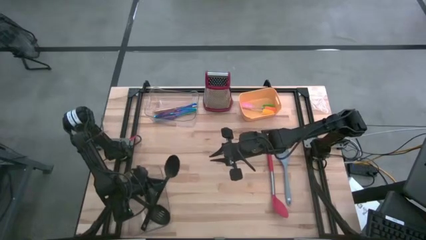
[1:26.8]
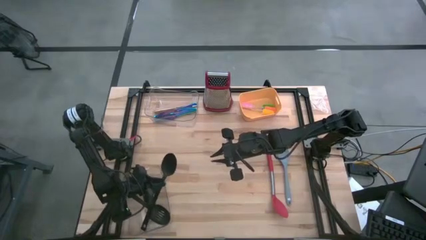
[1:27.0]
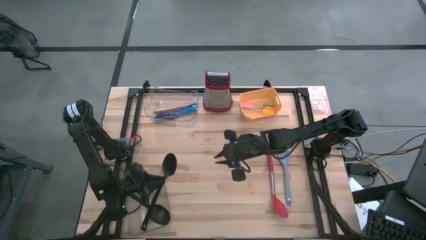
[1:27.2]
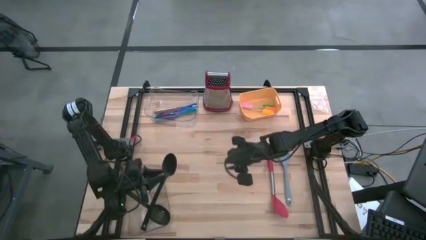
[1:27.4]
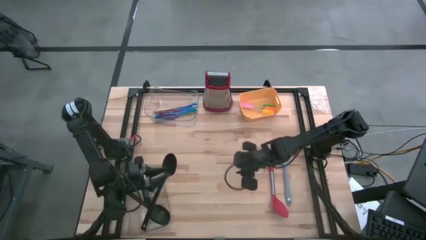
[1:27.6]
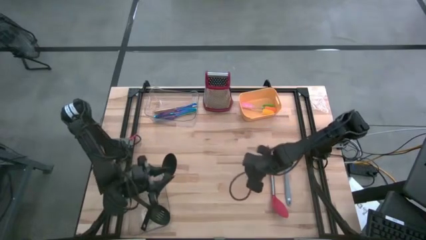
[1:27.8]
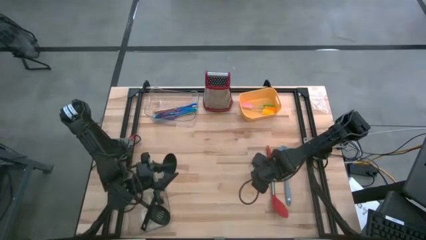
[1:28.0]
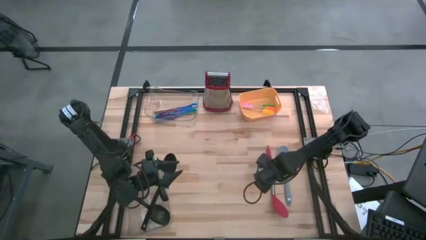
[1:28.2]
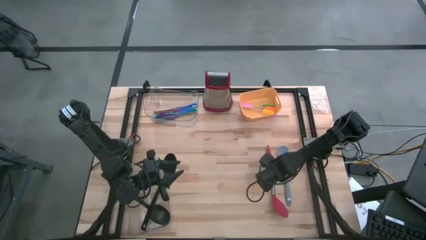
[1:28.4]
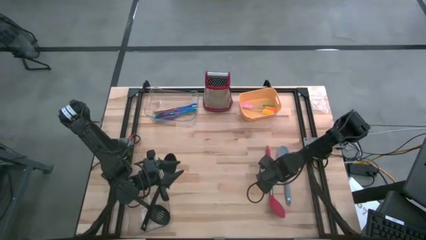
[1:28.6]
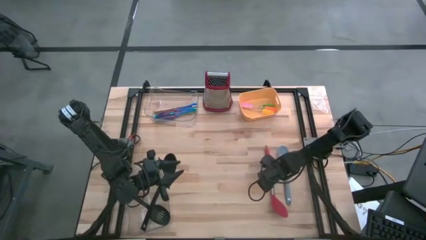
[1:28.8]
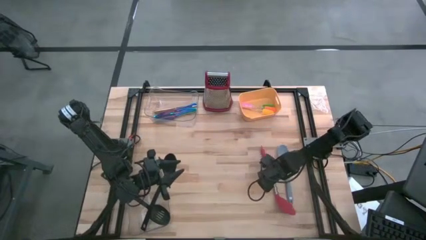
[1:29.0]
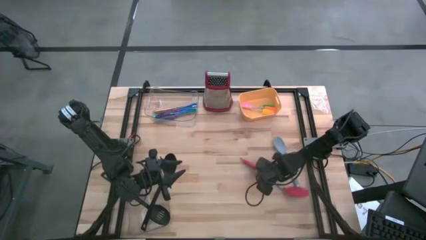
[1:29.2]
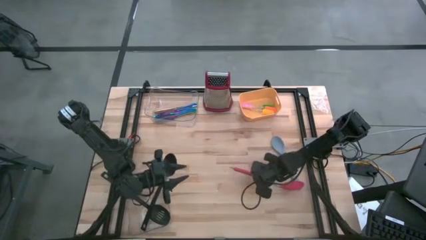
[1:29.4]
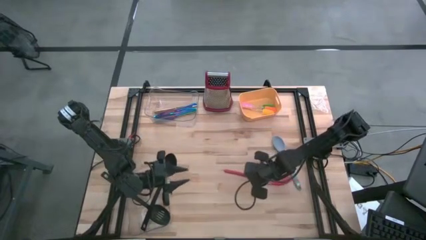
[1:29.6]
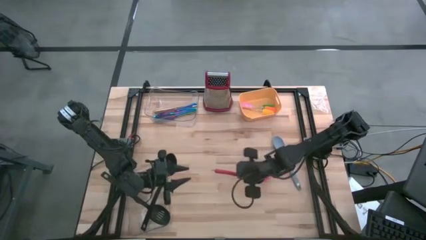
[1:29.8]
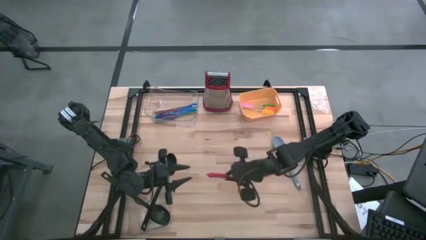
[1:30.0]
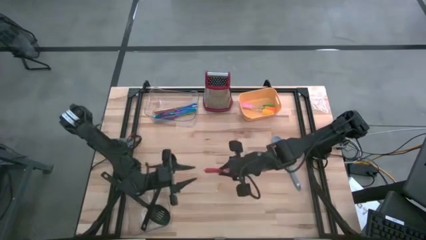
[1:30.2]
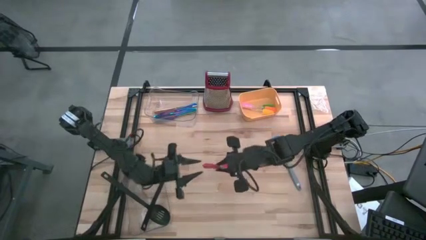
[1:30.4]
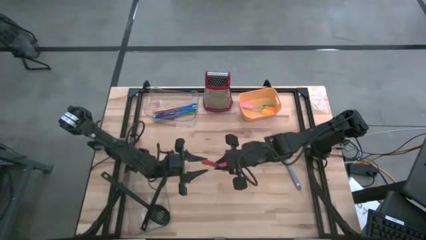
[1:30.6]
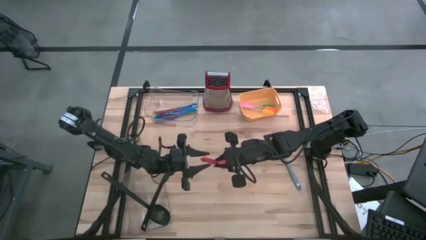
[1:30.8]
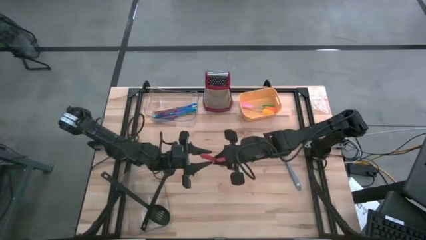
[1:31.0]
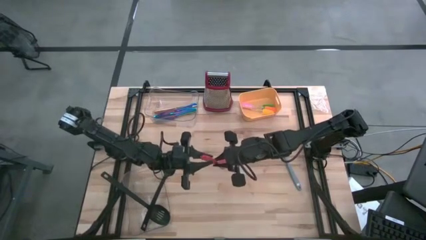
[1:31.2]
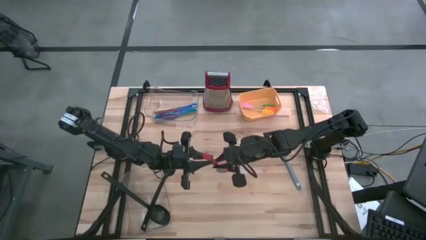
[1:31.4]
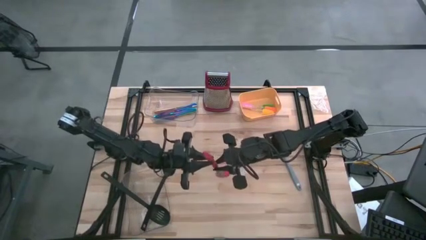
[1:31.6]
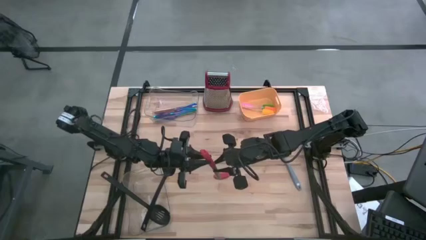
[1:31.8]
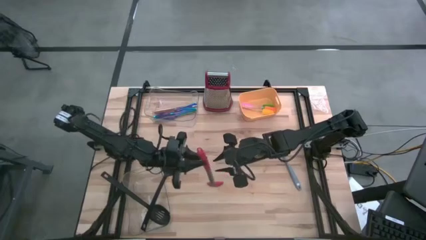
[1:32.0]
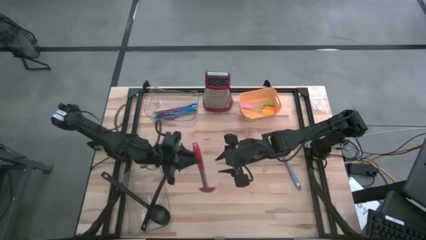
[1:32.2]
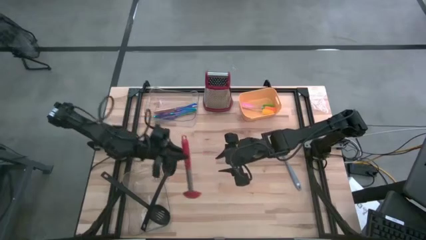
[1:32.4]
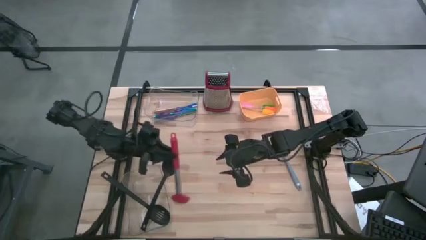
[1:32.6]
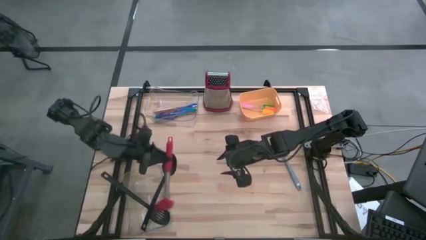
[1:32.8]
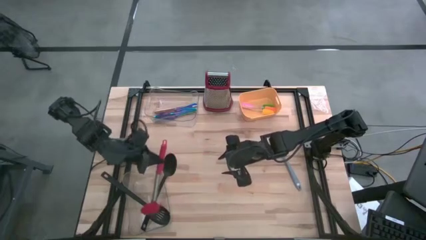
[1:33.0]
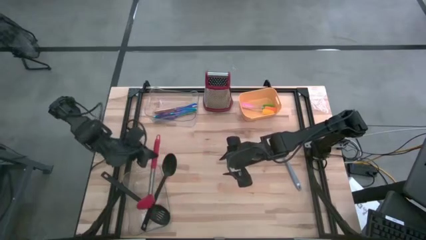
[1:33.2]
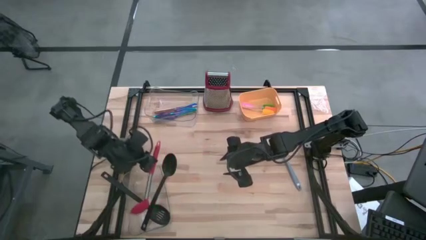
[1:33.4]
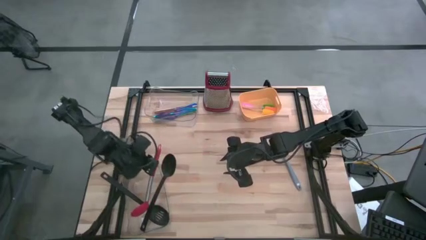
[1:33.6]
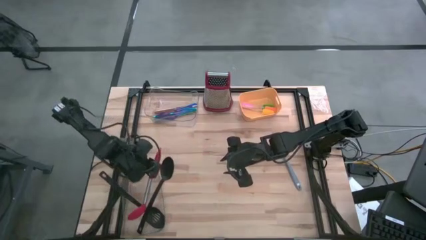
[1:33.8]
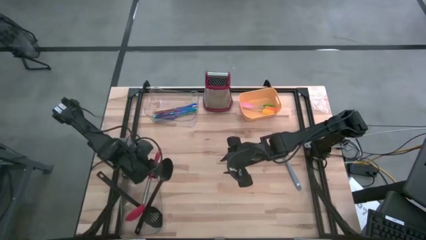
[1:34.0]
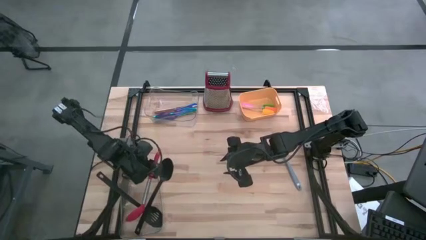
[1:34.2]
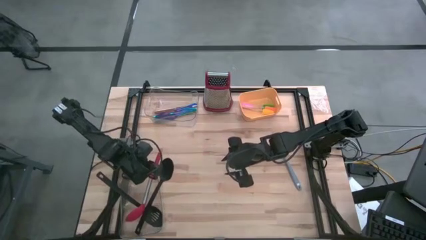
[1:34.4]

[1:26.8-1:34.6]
Task: Pick & Place Kitchen Items
Put the red serving spoon into the bottom transparent bin

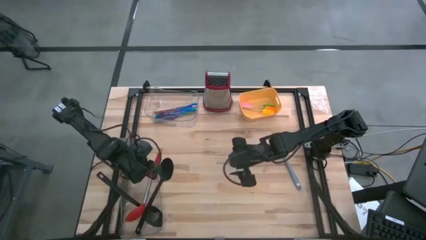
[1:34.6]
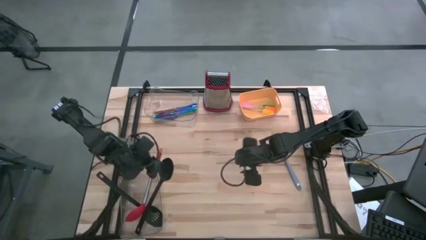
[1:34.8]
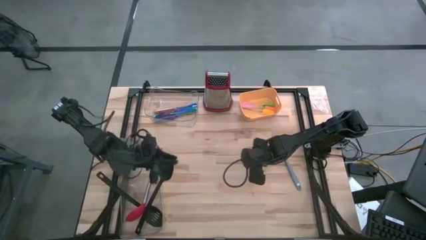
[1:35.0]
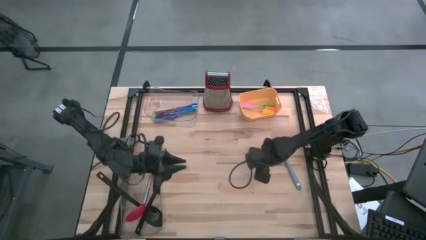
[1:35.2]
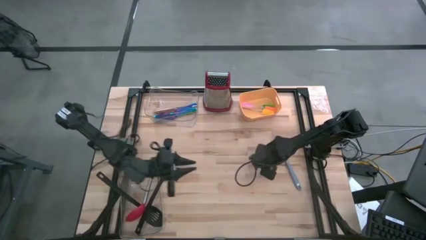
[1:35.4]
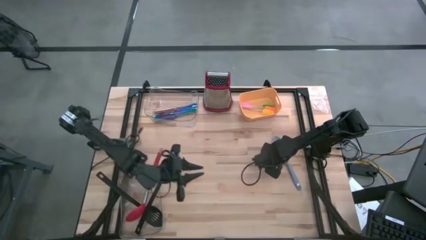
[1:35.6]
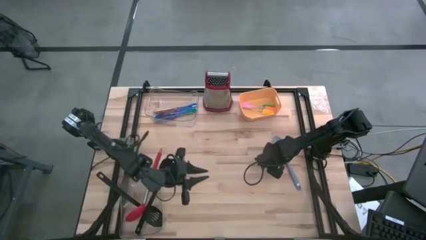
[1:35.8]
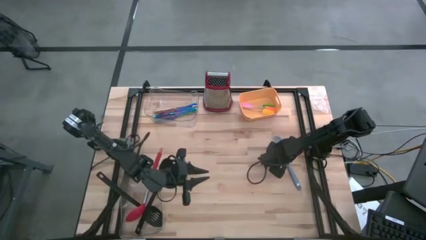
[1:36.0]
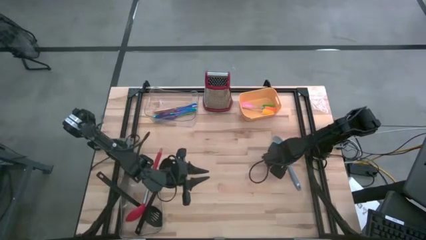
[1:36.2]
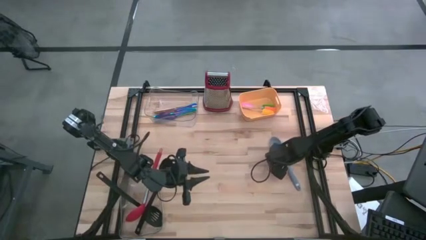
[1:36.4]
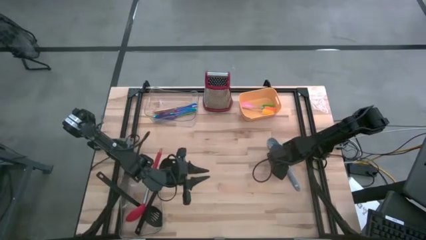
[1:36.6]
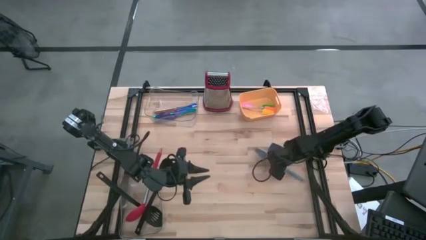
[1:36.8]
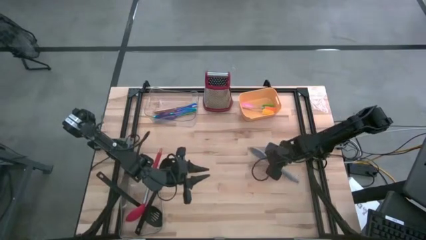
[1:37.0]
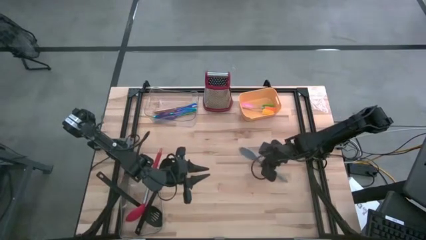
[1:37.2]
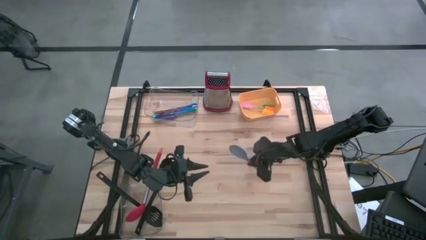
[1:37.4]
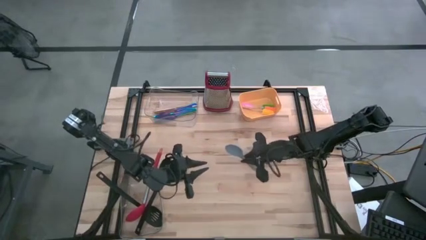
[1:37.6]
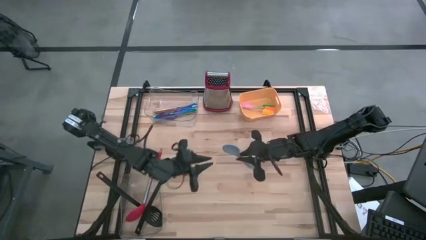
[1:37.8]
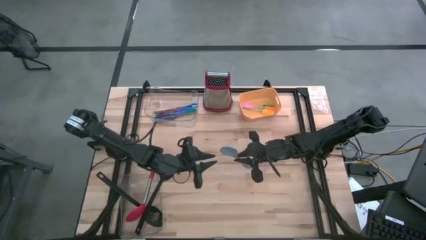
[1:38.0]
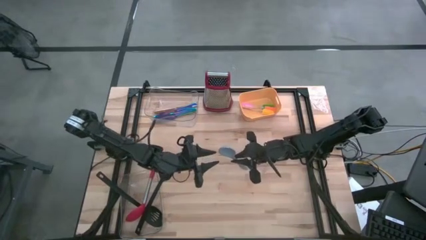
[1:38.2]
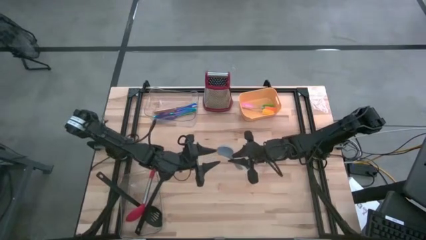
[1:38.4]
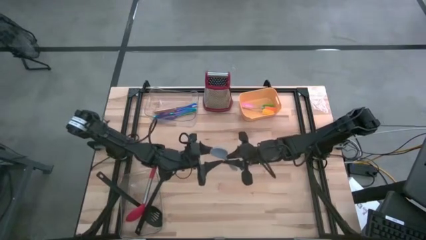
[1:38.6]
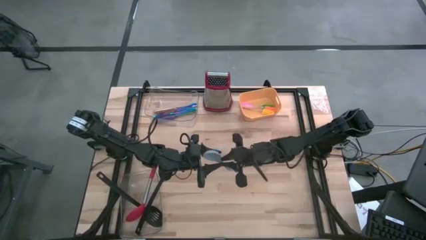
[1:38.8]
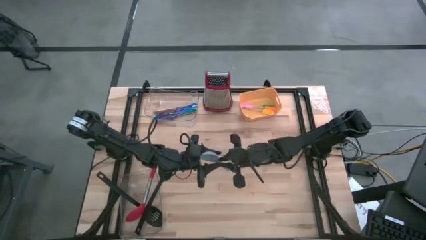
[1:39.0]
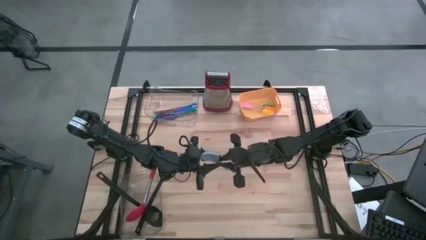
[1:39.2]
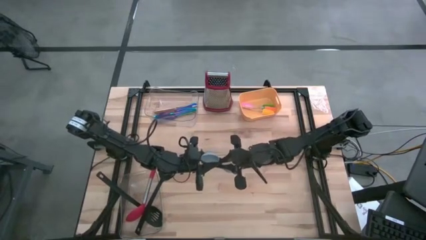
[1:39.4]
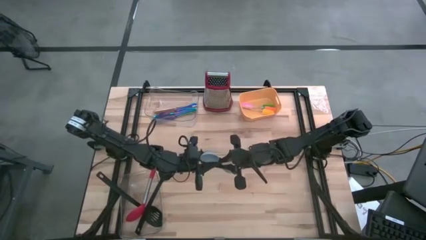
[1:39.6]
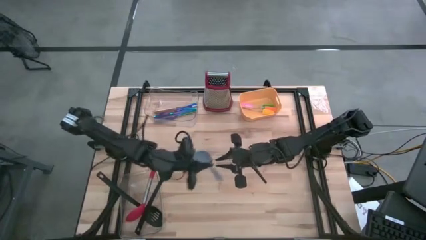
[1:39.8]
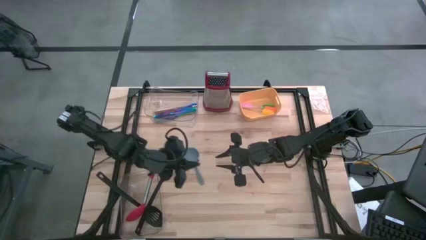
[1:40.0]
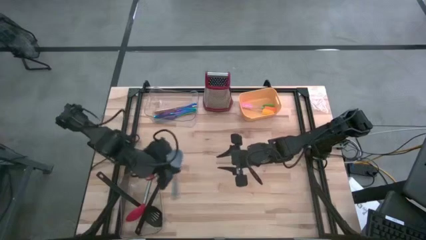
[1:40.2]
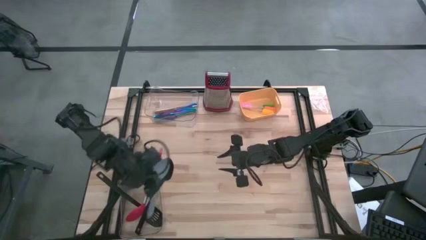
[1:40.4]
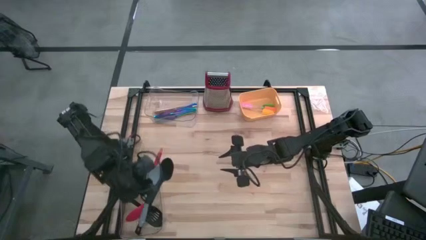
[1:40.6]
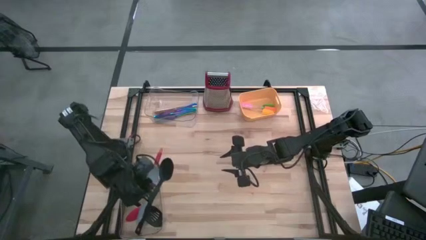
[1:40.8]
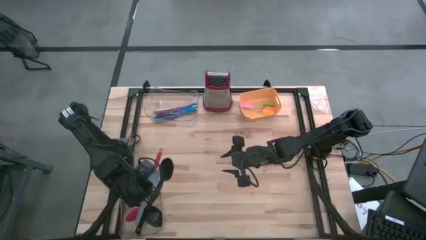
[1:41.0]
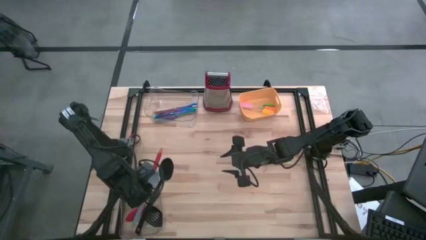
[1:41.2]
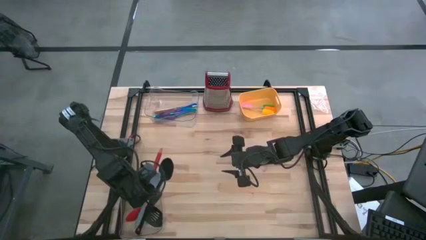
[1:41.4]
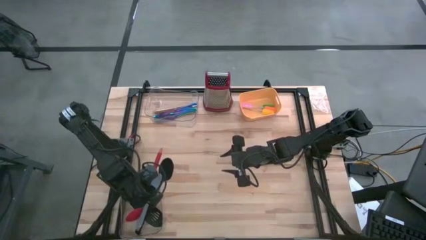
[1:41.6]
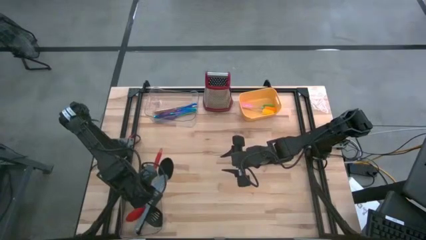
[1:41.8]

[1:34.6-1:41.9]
Put the gray serving spoon into the bottom transparent bin

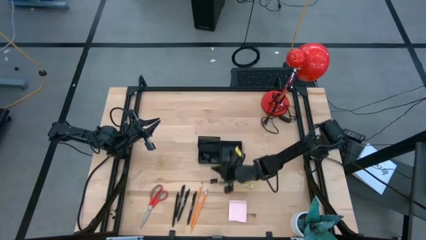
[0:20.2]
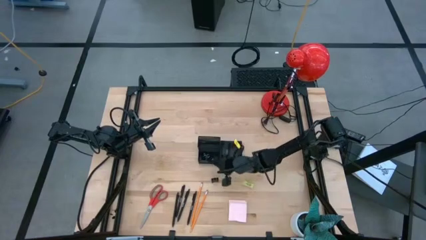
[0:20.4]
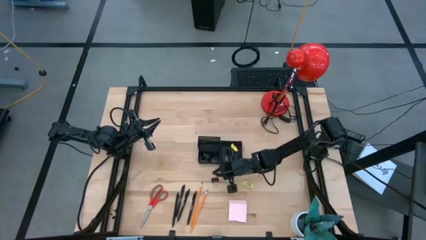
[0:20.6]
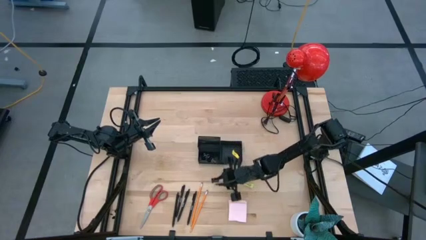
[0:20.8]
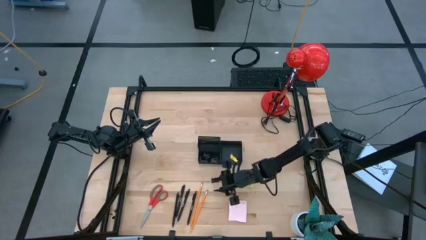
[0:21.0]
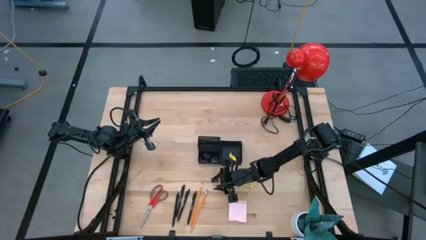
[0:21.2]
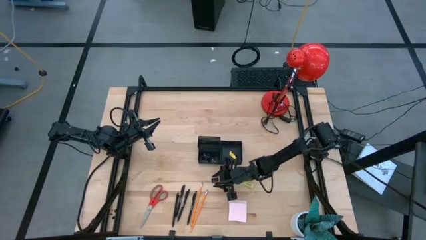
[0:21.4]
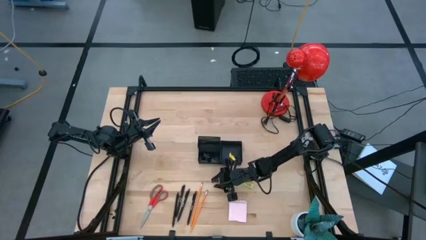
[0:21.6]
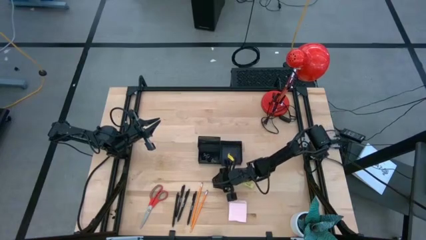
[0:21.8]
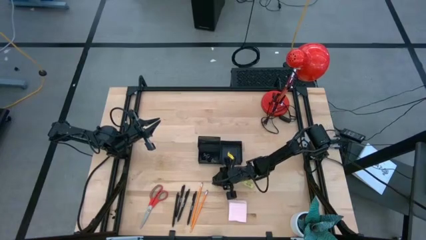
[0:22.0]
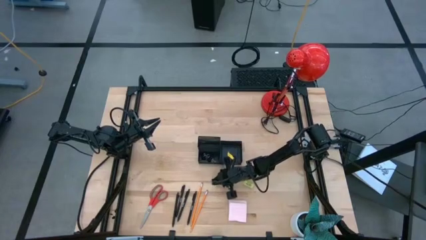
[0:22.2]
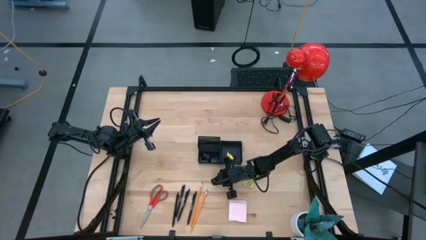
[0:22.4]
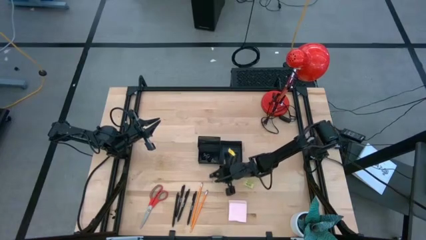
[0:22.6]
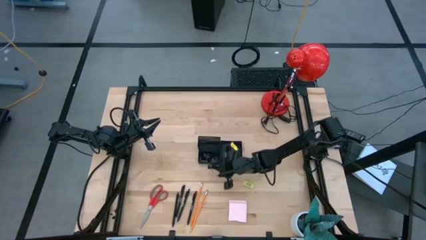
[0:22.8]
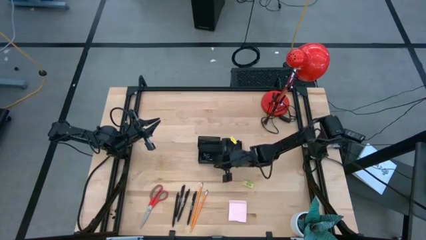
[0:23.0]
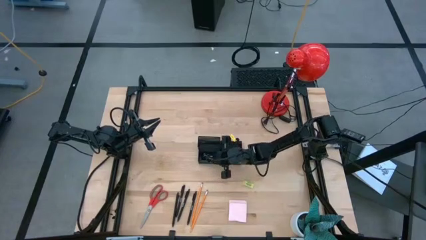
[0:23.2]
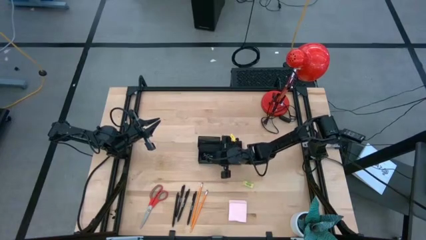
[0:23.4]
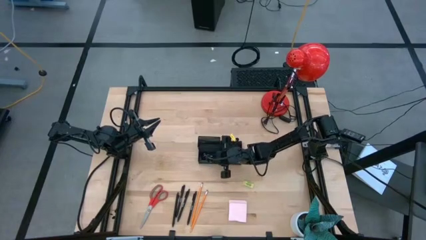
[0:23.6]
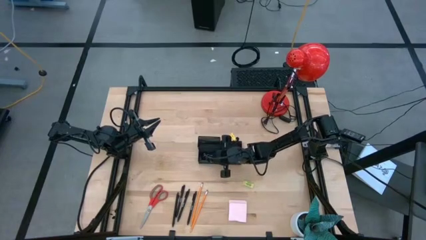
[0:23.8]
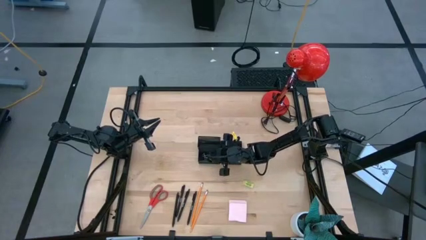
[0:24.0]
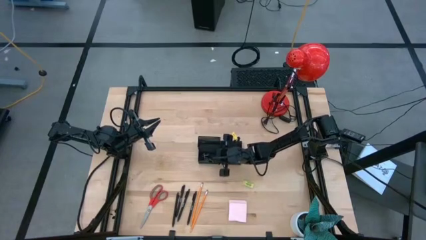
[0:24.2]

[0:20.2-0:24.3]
Task: Pick and place office supplies into organizer
Put the black binder clip into the black desk organizer
